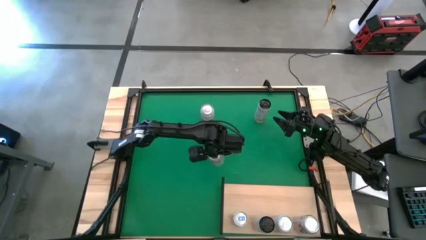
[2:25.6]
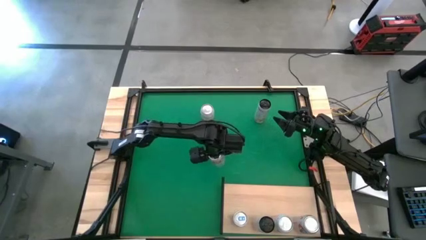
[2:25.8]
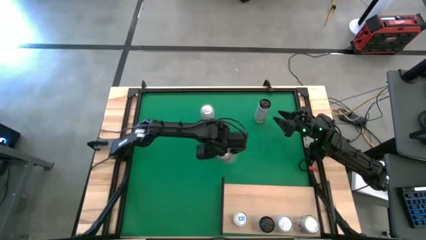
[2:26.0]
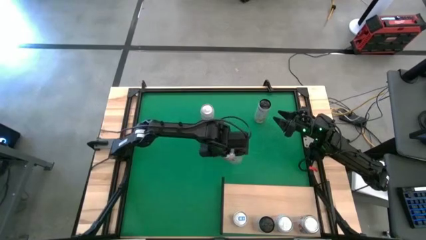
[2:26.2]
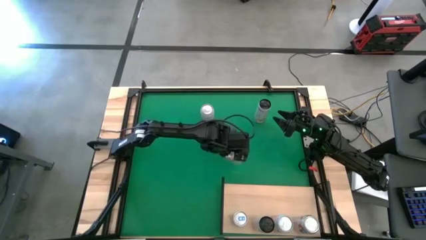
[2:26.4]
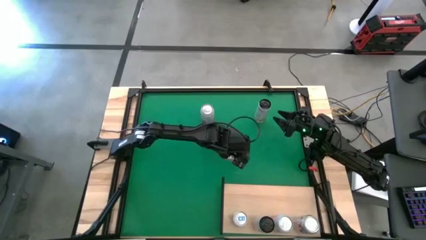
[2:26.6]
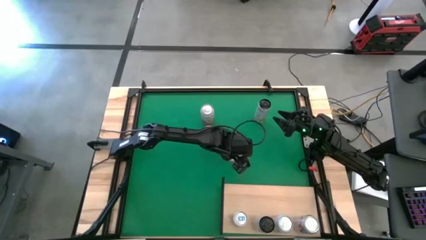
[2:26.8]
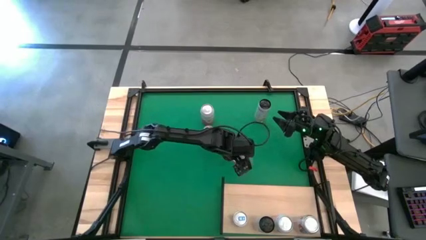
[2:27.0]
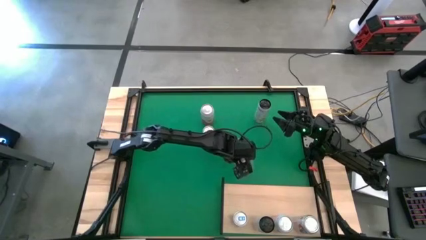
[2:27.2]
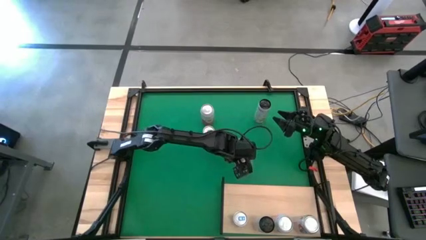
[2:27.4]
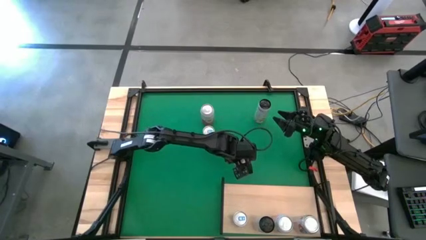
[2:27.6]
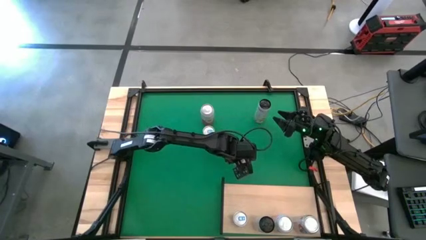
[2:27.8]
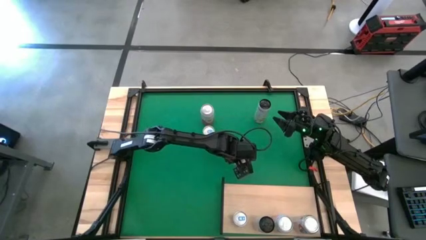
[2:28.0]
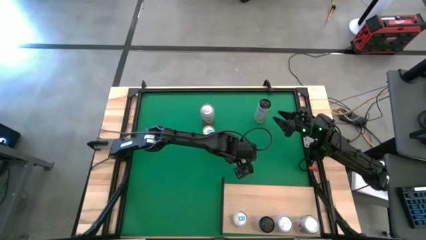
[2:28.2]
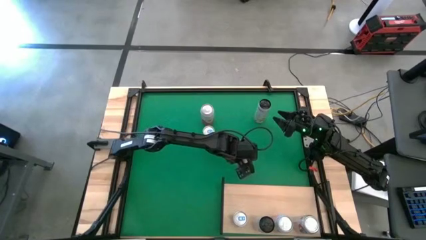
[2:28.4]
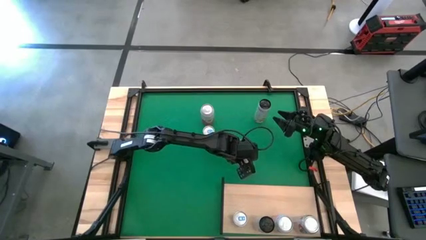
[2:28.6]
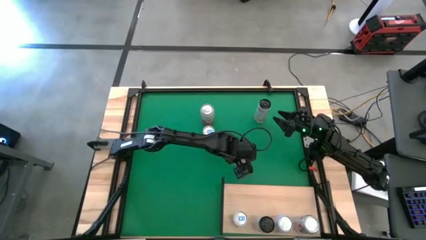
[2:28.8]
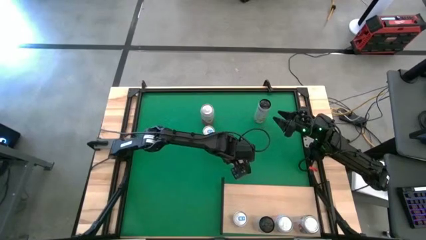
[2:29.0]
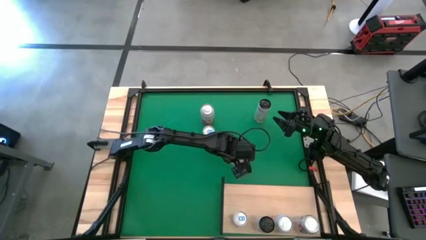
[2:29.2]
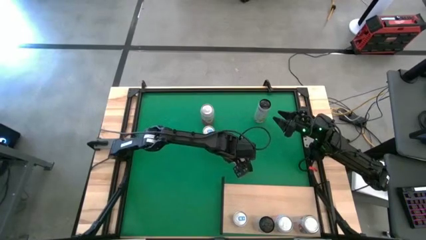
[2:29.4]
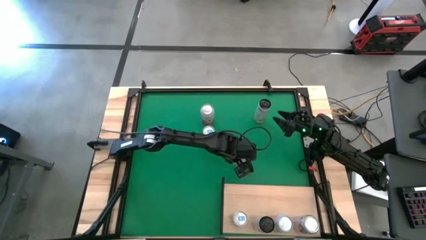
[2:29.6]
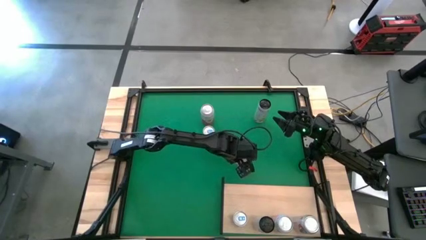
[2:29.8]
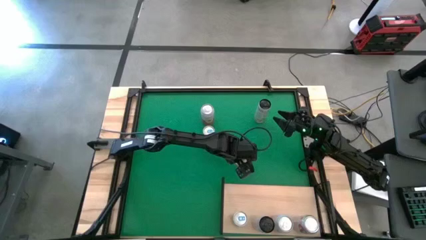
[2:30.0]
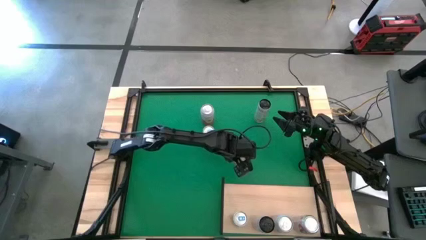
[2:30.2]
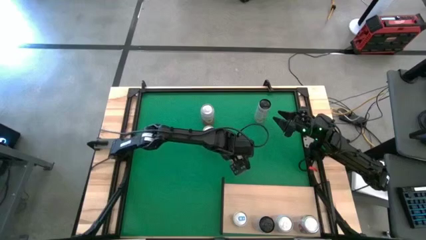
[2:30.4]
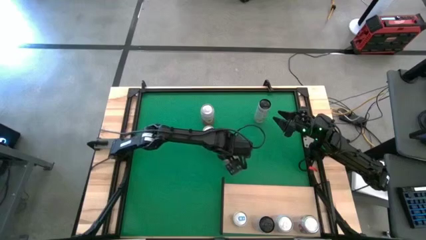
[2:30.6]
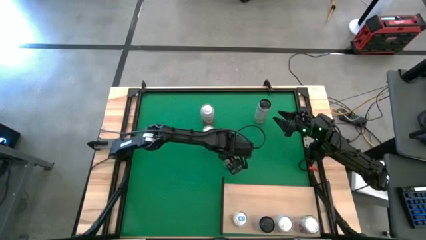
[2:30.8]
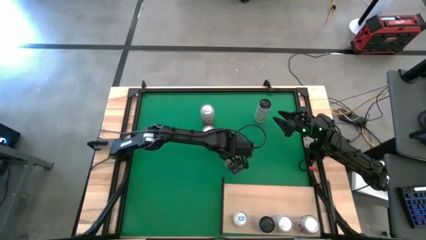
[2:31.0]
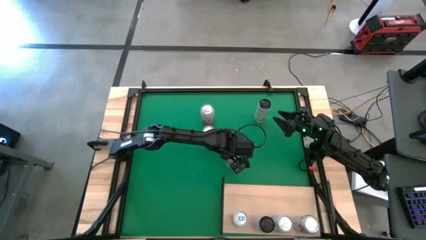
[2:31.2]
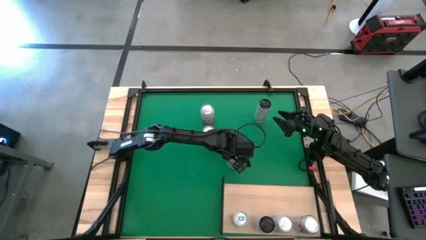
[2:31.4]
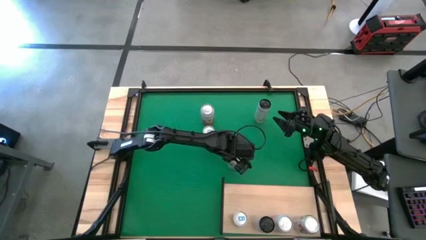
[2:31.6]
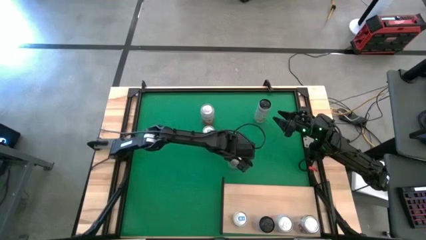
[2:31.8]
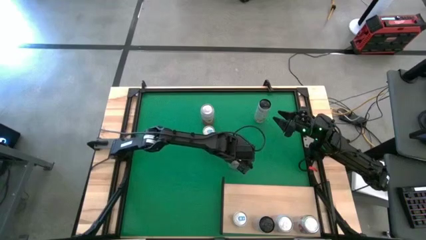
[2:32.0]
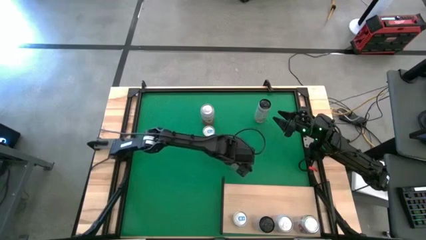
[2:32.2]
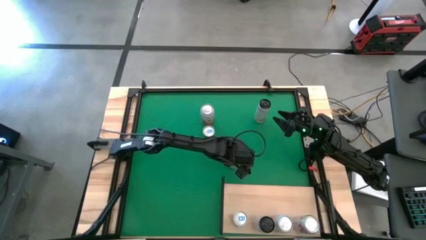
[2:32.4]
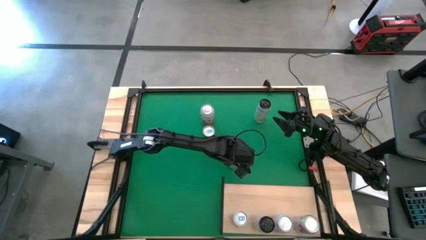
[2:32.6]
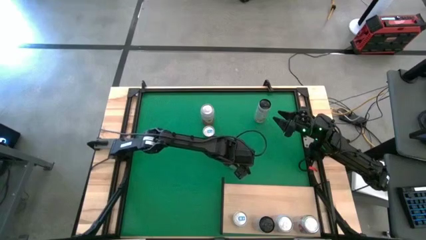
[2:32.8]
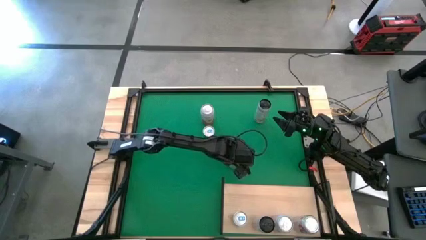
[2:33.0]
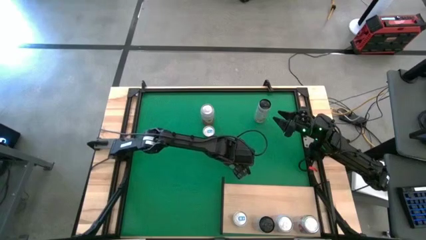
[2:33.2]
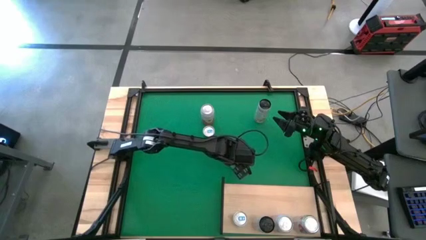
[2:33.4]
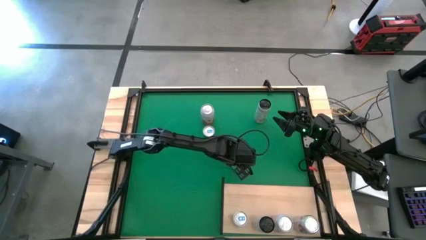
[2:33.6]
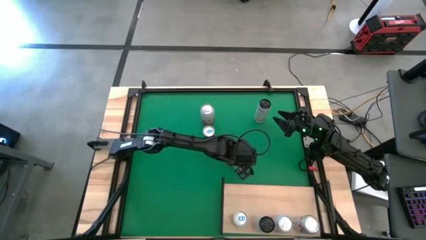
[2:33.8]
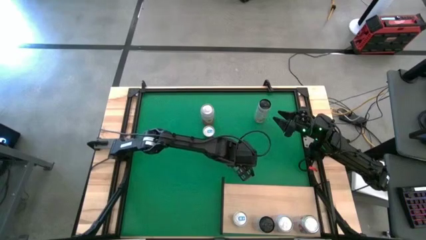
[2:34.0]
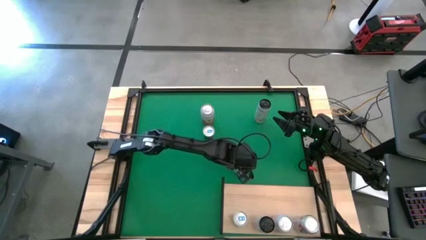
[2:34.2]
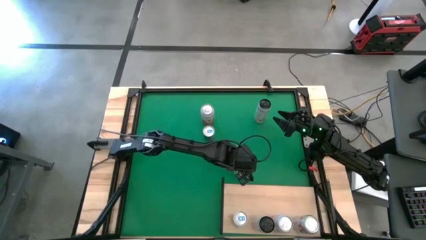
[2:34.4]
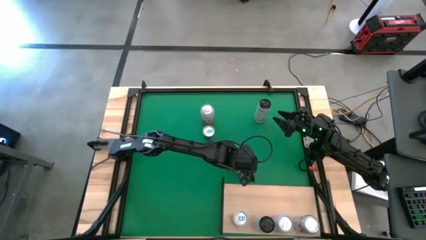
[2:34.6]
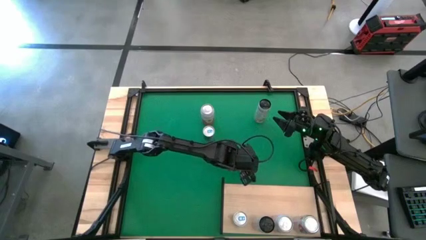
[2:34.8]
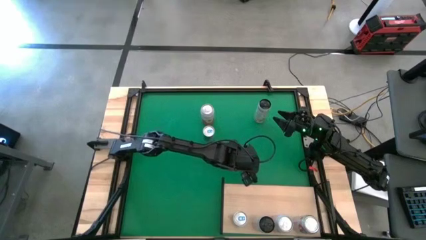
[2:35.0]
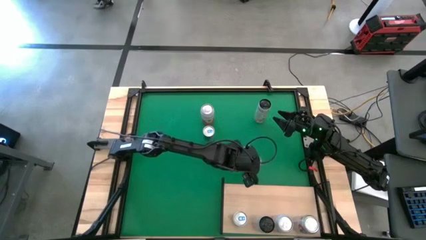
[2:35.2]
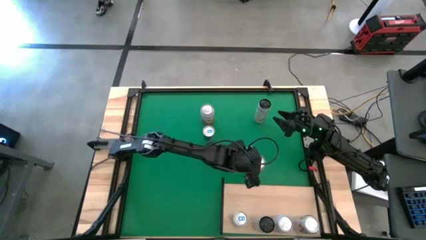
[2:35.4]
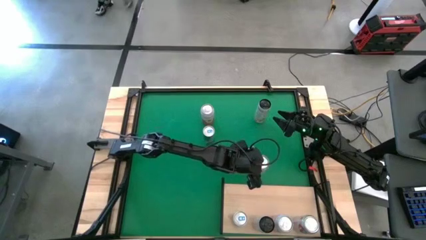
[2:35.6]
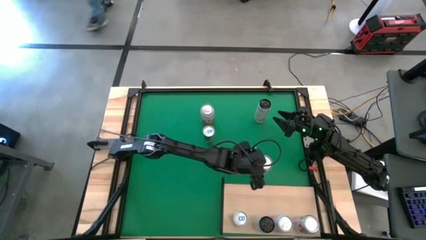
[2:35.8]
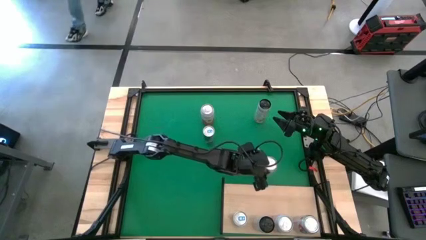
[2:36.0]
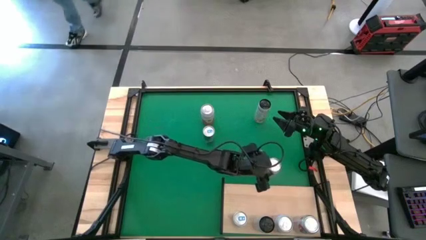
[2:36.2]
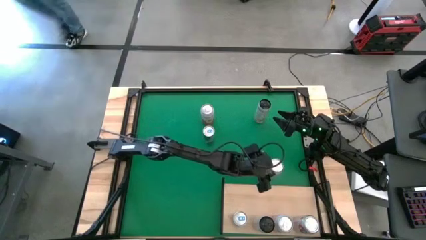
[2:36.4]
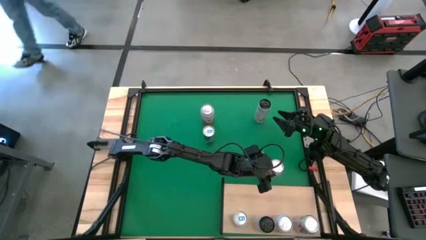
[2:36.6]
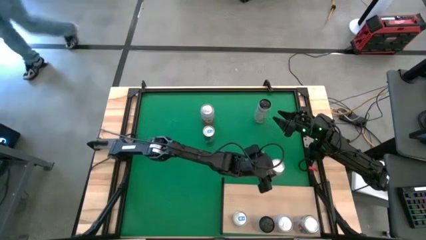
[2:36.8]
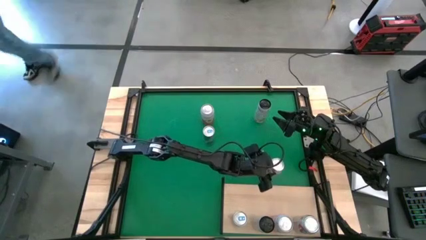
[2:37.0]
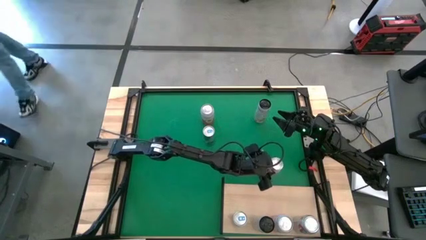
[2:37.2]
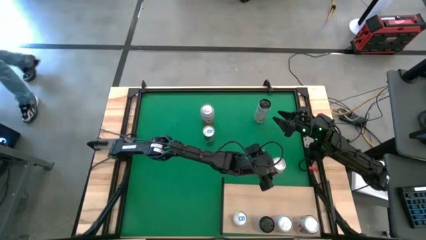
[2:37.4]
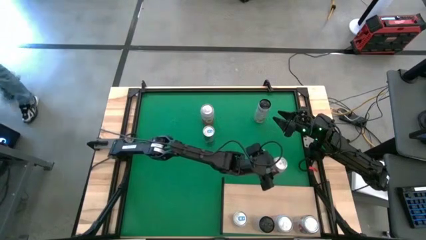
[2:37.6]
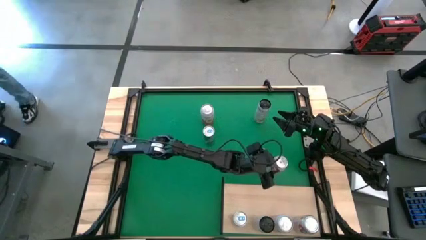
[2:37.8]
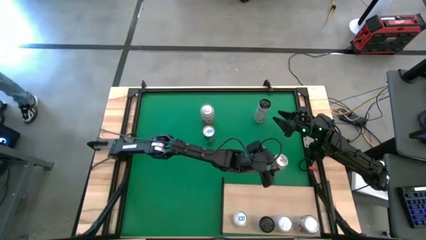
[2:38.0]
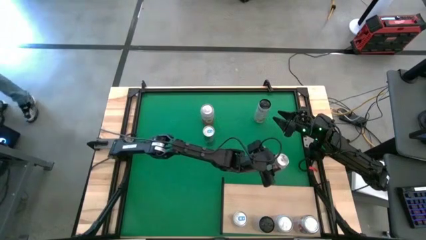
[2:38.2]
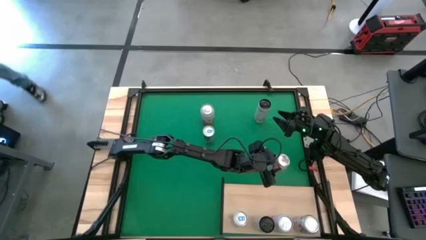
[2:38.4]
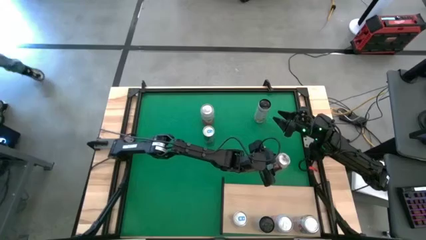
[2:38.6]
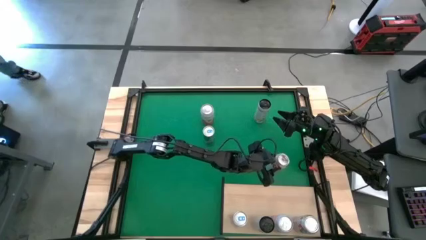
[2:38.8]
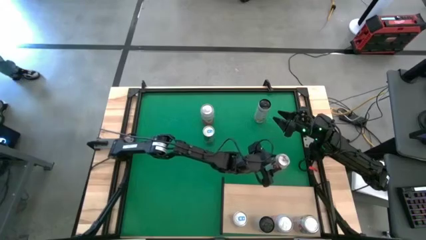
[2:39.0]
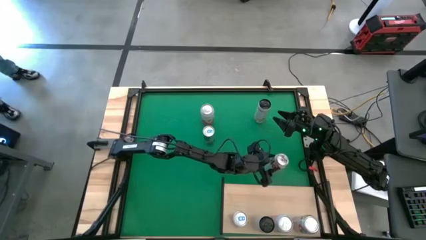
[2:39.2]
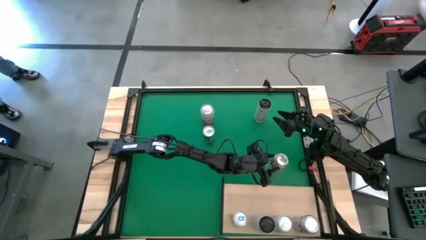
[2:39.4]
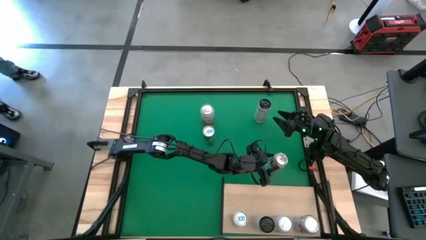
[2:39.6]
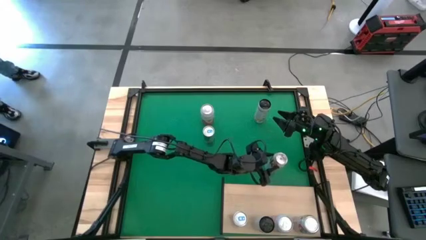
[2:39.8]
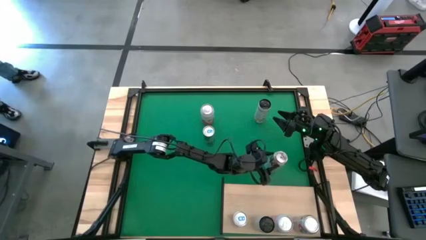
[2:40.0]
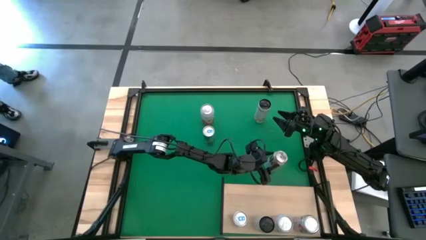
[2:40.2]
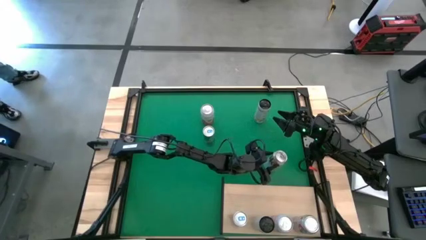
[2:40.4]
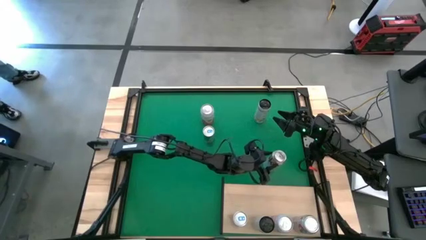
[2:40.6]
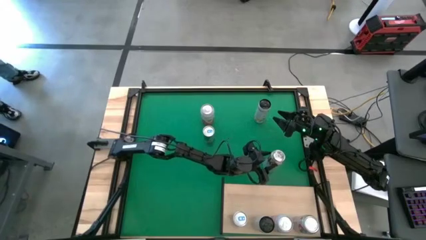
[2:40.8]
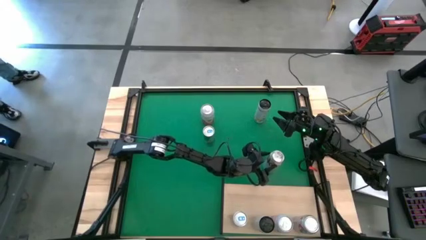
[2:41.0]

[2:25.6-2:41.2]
Task: Place canned beverage on shelf
Move the red-silver soda can near the shelf
